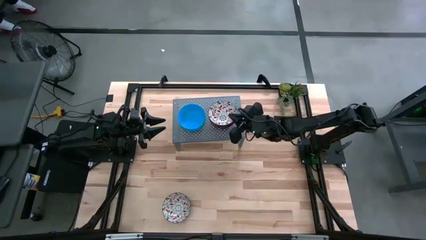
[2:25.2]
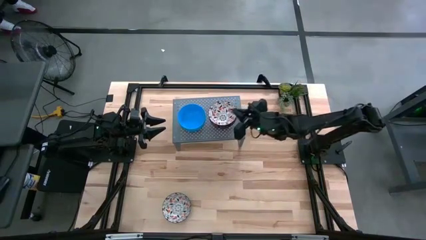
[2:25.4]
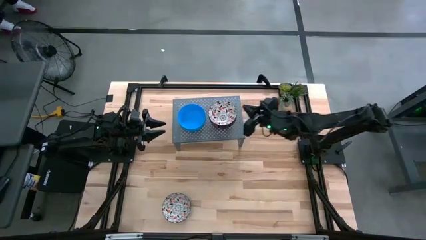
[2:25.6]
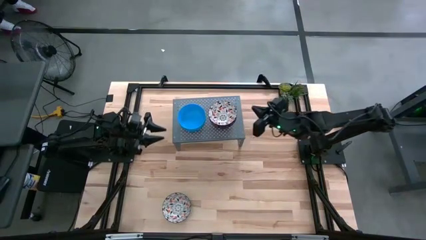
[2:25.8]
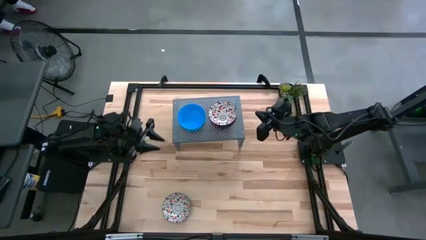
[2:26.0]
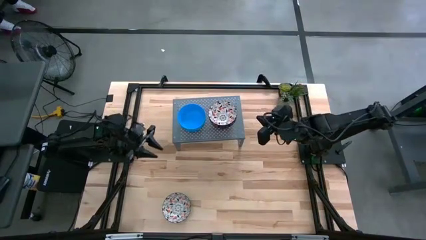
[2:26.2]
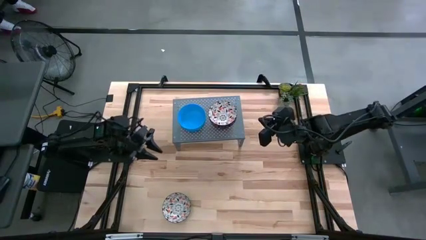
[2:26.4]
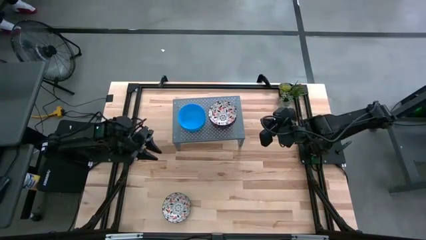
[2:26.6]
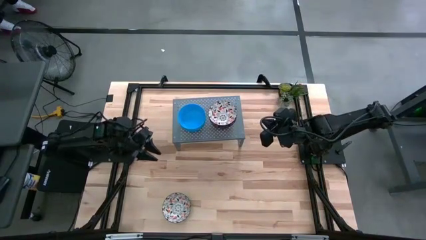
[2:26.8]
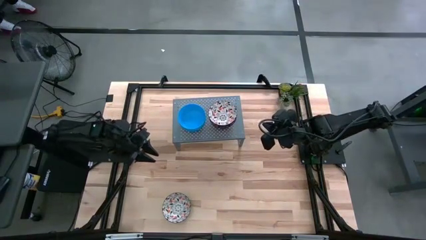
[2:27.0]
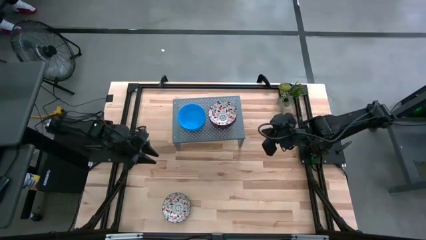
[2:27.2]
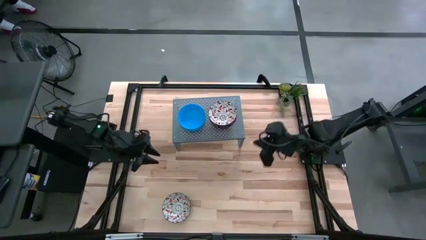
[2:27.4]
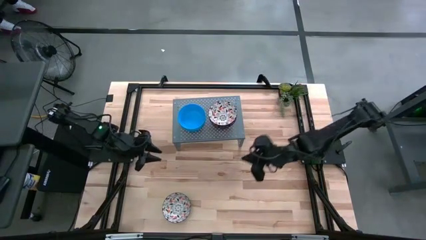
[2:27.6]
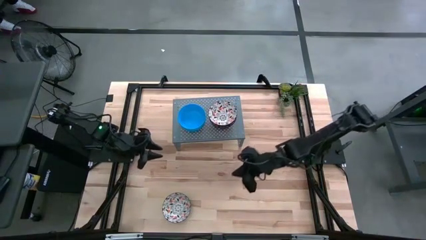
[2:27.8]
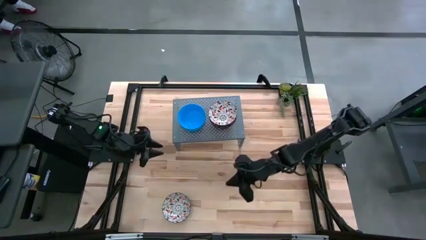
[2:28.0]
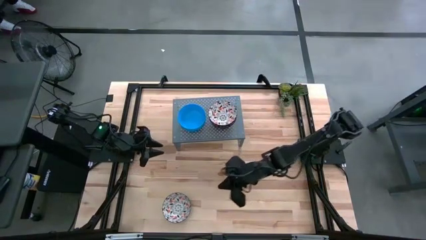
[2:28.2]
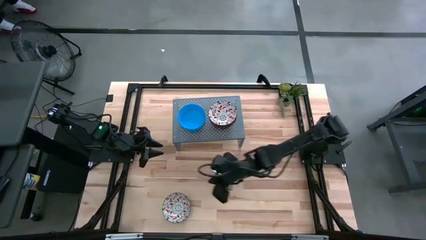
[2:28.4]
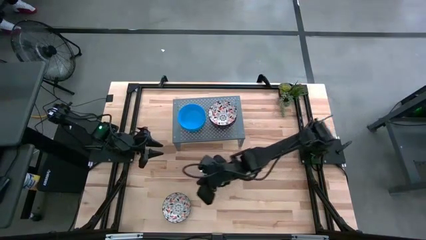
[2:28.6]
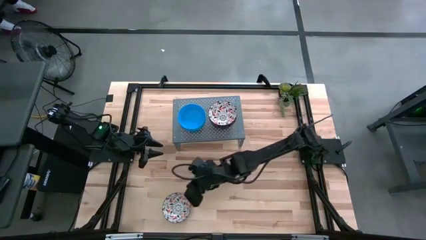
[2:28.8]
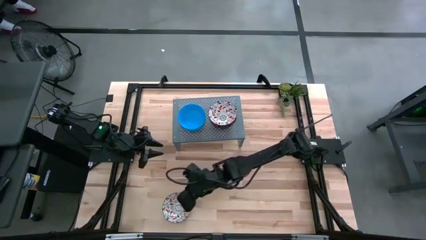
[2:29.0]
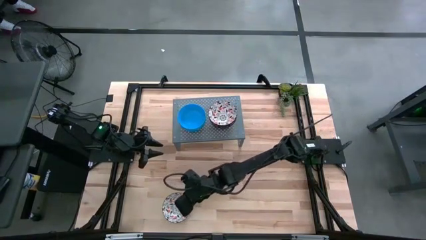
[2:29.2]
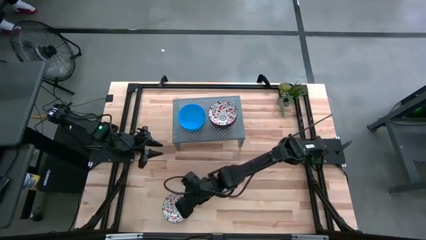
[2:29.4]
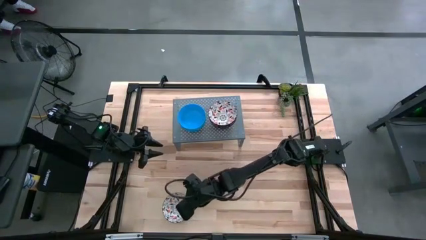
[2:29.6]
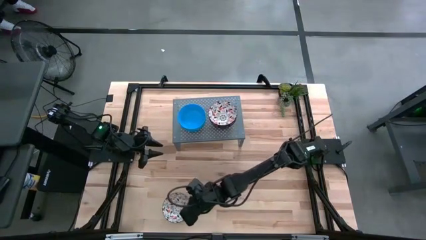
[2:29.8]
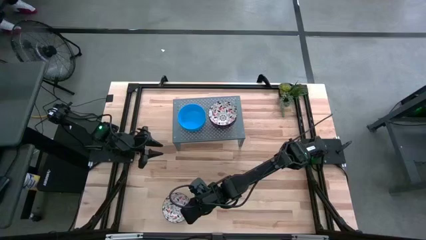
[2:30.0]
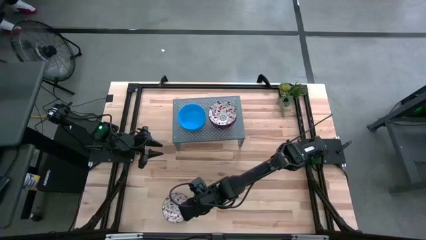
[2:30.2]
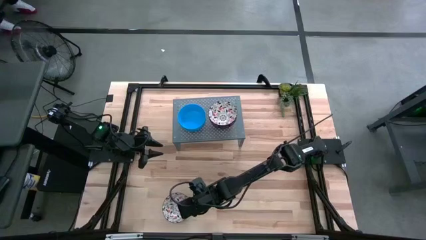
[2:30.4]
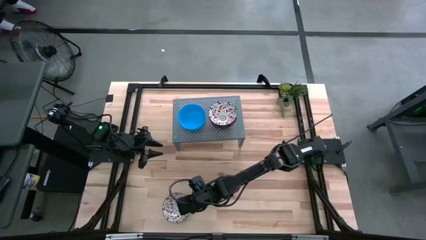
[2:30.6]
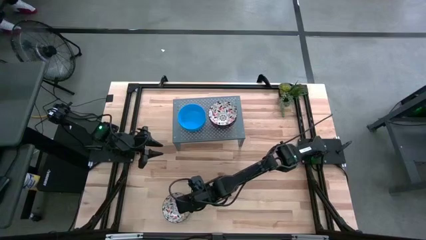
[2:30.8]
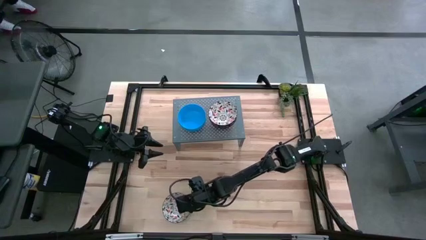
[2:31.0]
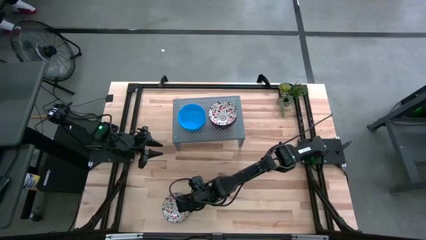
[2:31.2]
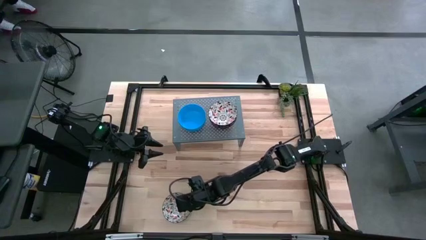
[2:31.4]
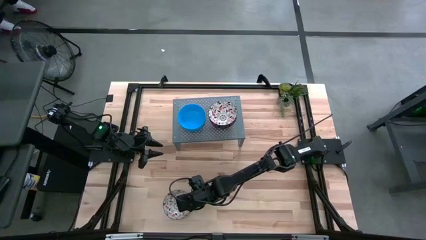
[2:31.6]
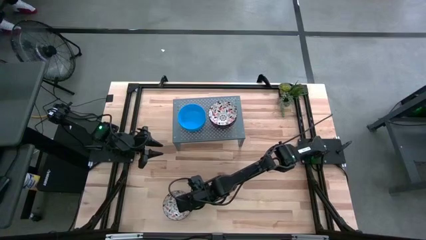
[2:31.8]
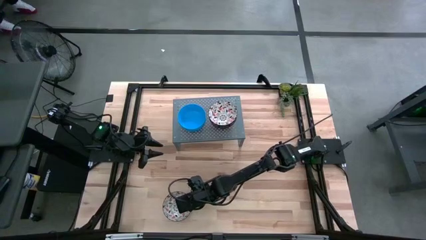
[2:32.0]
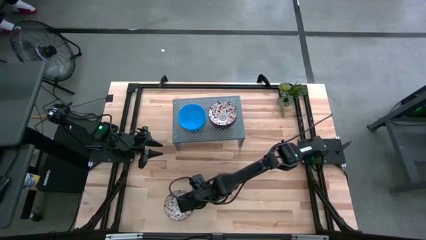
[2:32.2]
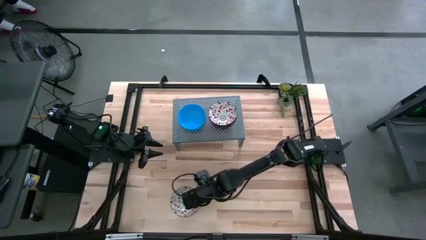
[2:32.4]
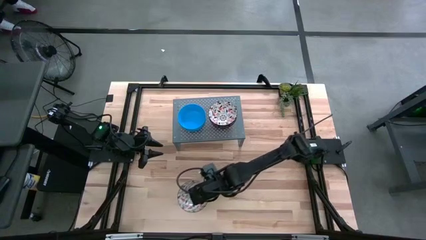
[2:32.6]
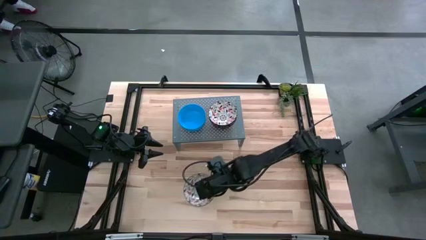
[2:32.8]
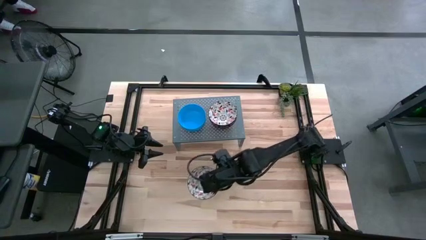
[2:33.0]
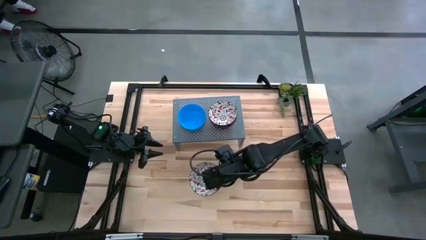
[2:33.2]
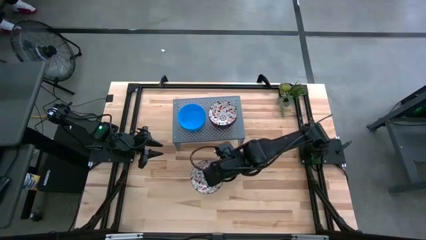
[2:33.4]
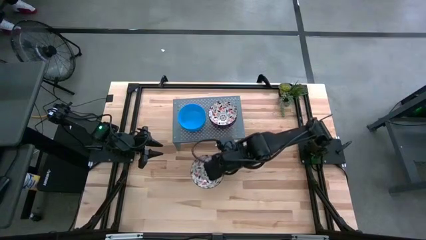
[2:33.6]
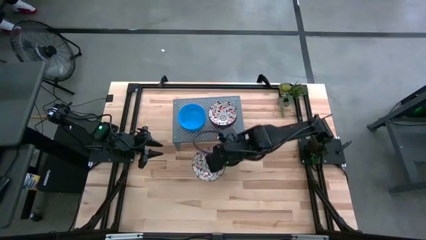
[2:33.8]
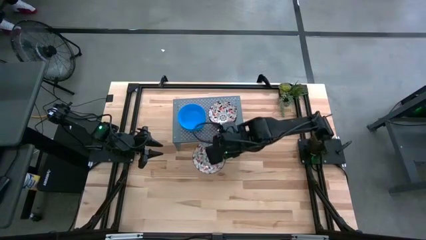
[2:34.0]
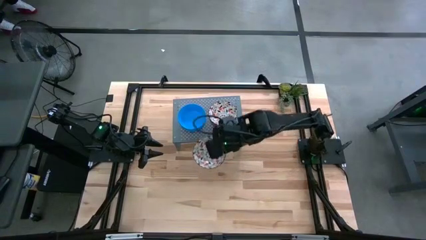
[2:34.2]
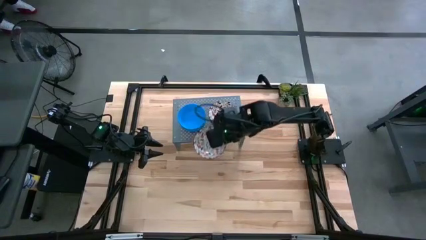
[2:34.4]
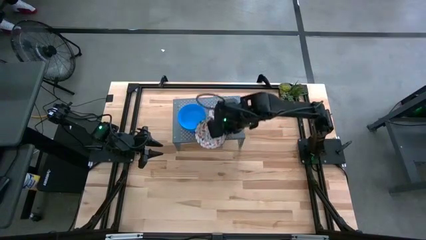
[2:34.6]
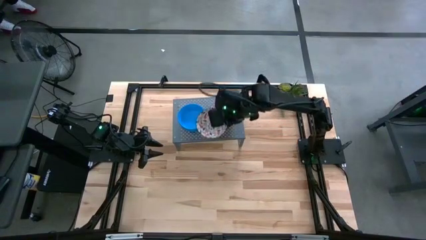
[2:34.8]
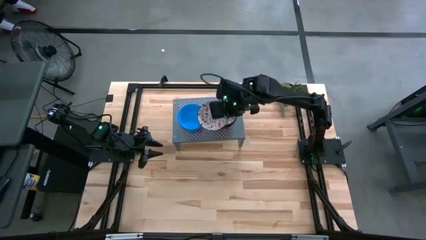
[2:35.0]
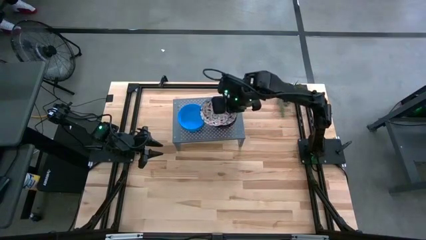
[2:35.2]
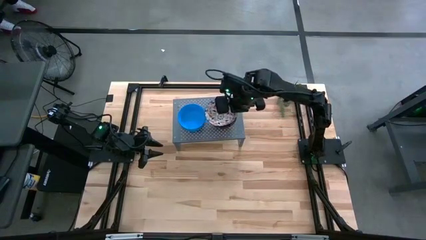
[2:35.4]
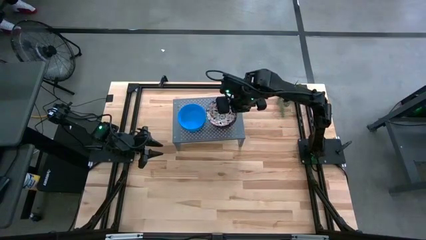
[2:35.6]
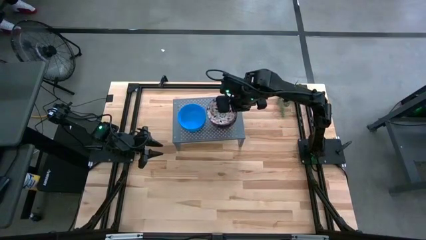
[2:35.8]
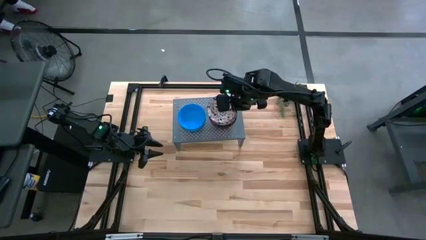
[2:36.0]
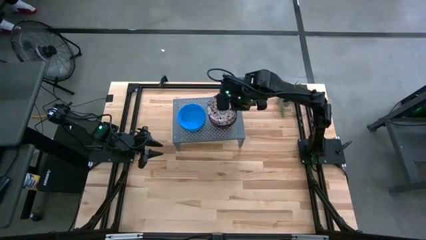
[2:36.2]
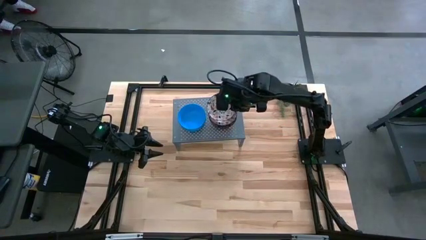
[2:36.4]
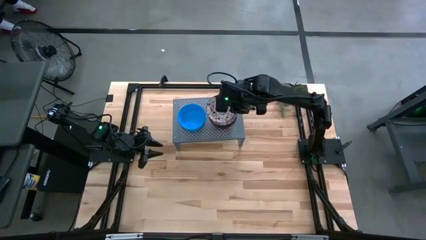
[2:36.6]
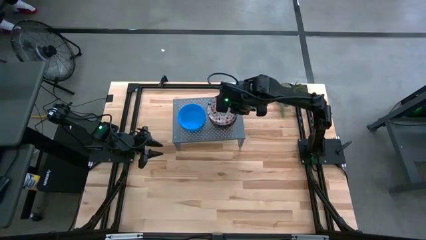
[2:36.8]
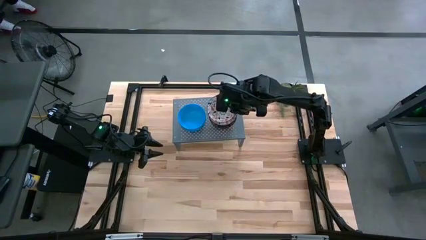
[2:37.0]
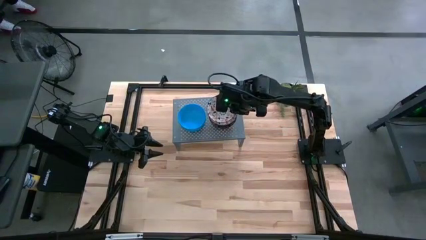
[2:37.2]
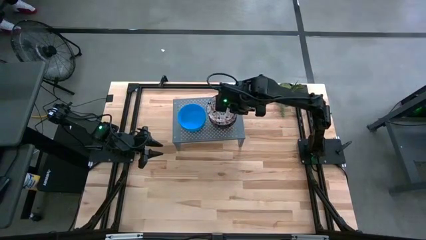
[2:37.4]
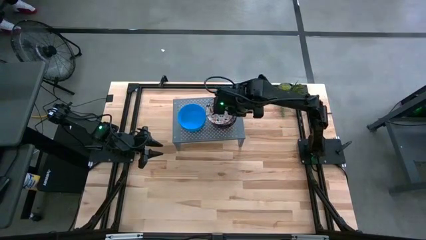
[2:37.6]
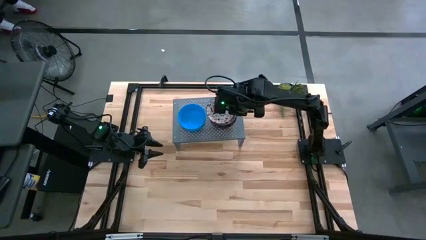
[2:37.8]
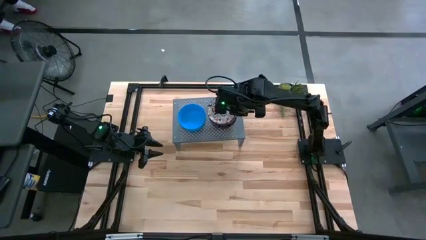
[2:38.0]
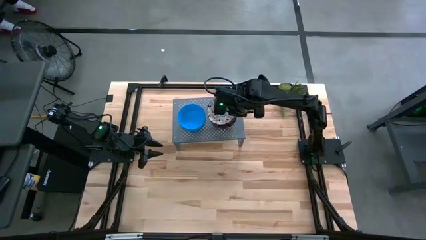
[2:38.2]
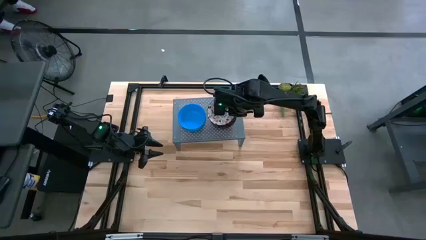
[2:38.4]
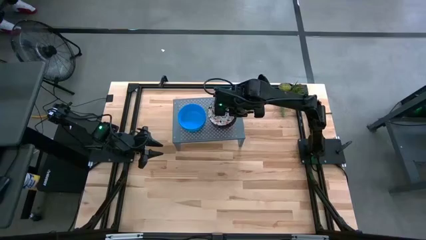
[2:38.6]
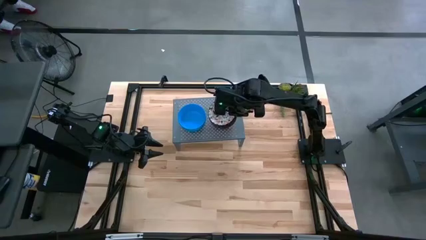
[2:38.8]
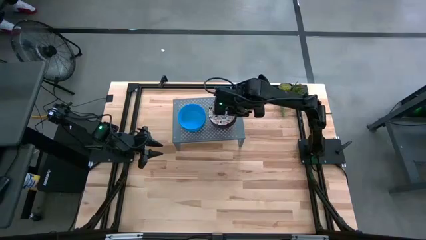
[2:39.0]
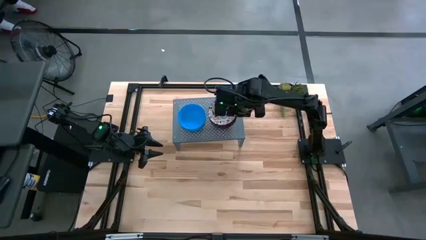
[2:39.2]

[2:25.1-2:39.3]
Task: Pick & Place Mini bowls
Stack the white bowl on top of the white bowls on the shelf

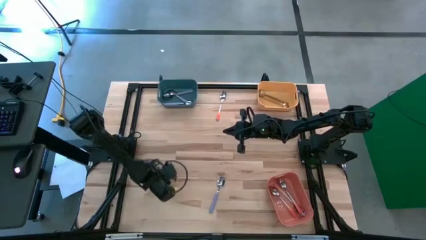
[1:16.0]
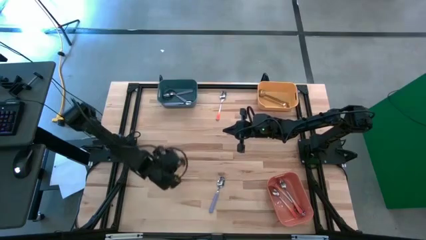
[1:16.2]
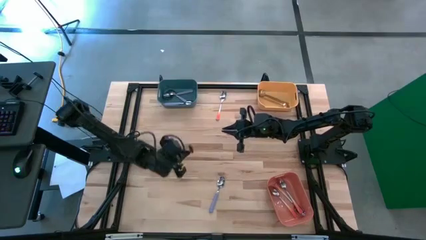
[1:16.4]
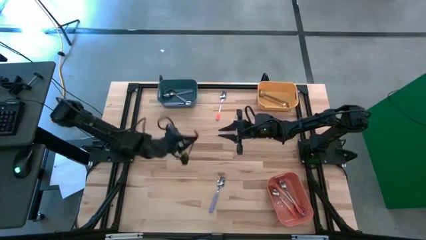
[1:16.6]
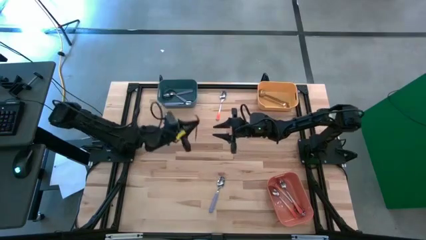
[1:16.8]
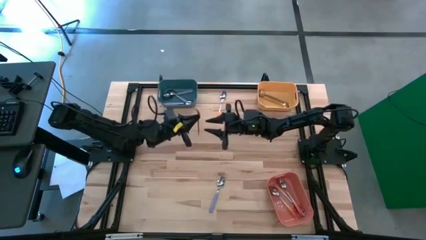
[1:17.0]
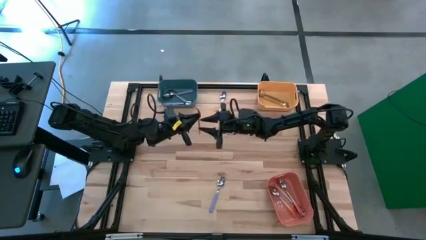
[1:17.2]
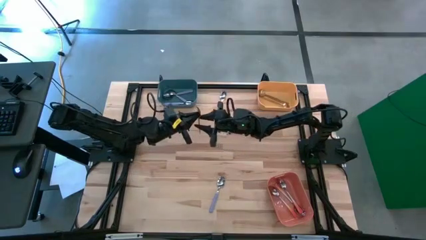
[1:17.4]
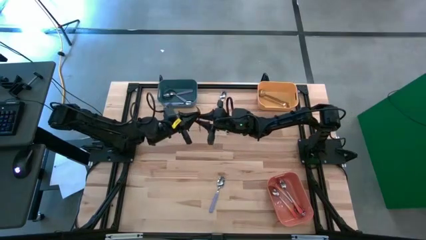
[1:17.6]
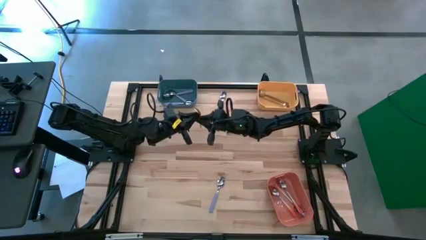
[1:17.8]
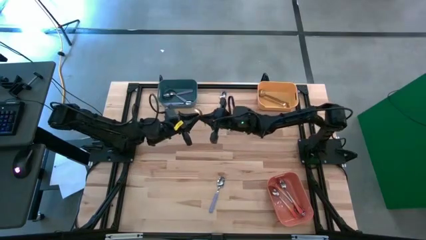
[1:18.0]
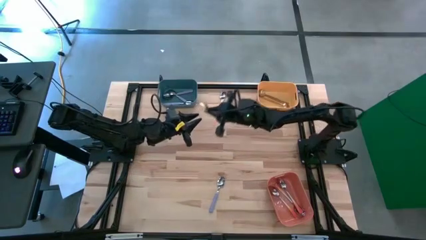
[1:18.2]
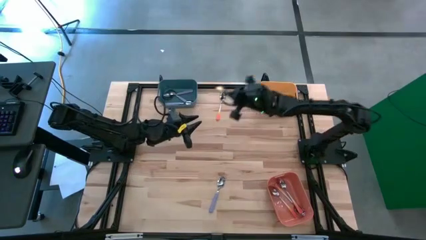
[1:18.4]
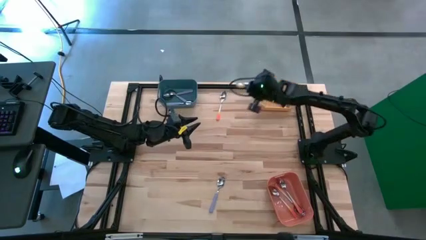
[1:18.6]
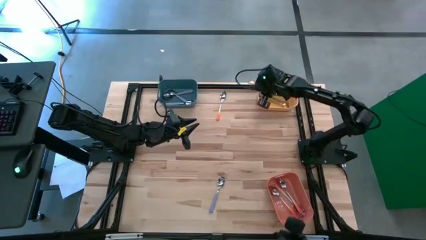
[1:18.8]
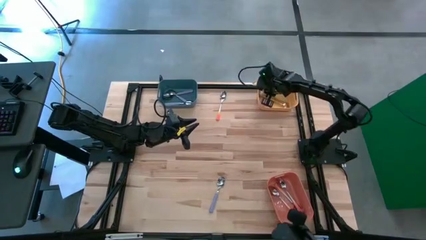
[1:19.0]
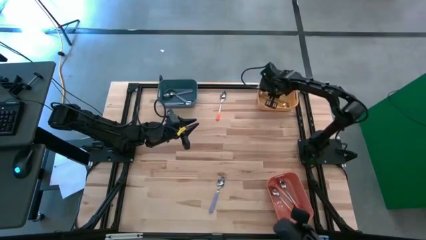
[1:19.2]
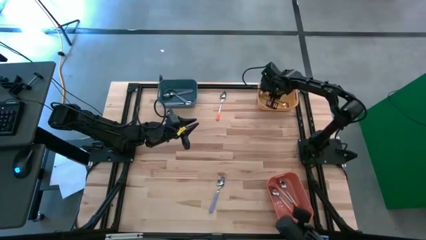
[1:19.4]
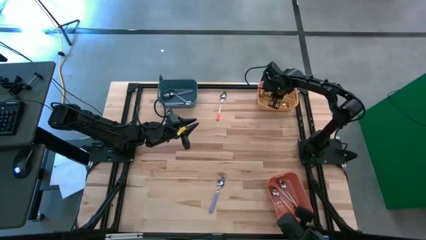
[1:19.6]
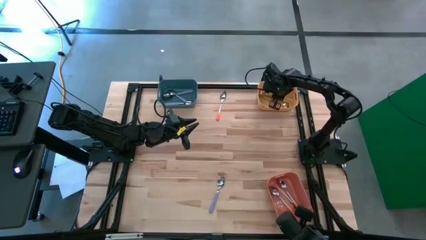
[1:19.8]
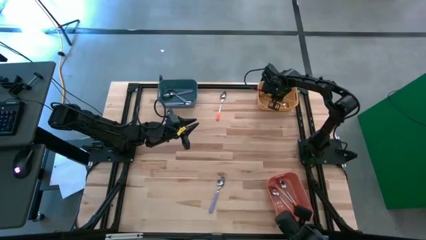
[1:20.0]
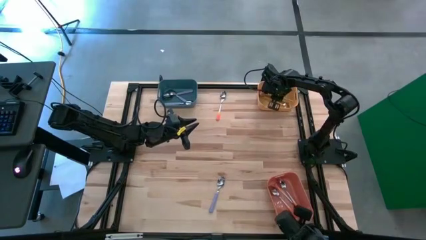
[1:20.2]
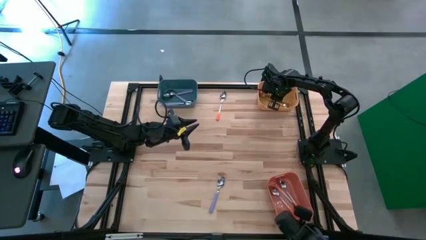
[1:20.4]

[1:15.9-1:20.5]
Task: Sort silverware by color (type)
Put the gold spoon into the yellow bin
